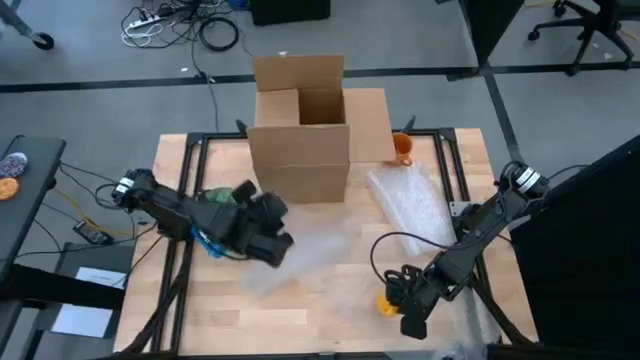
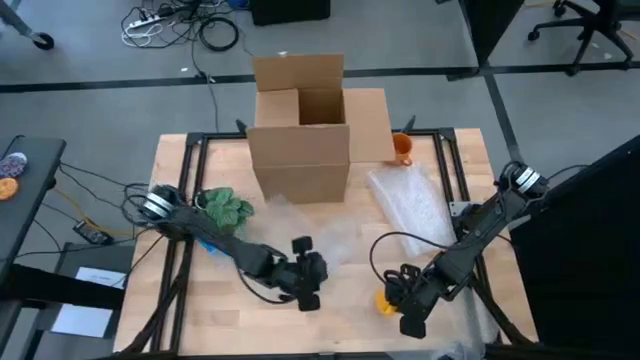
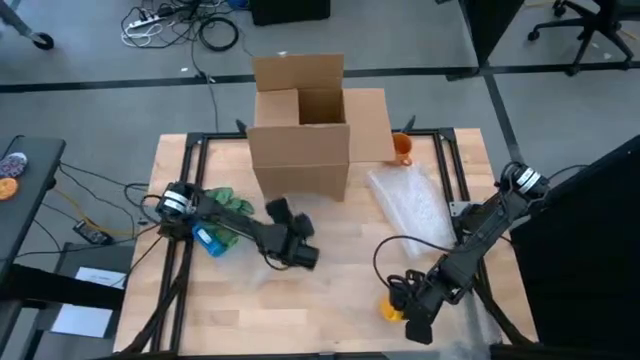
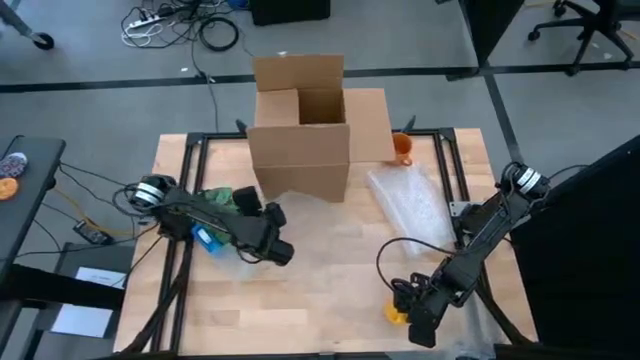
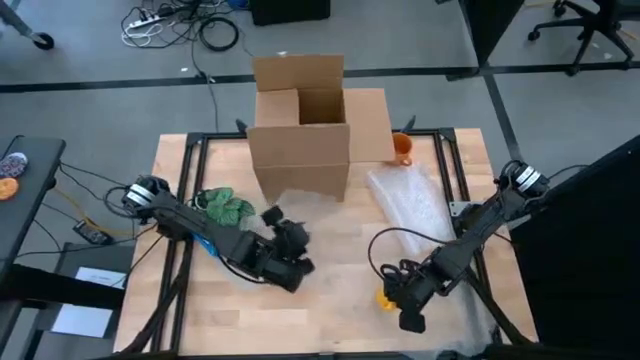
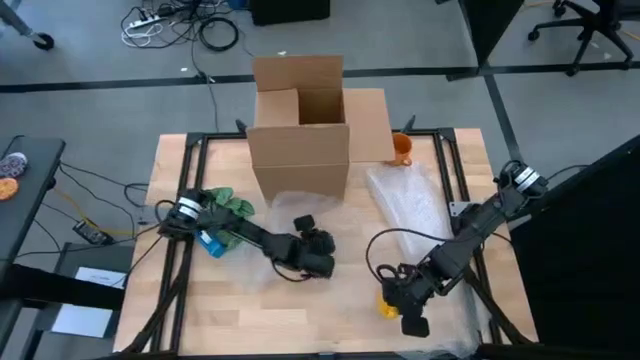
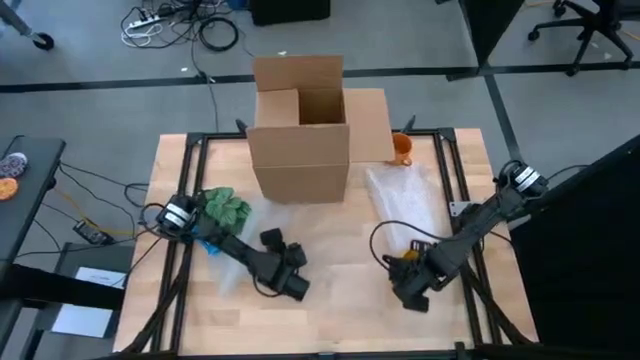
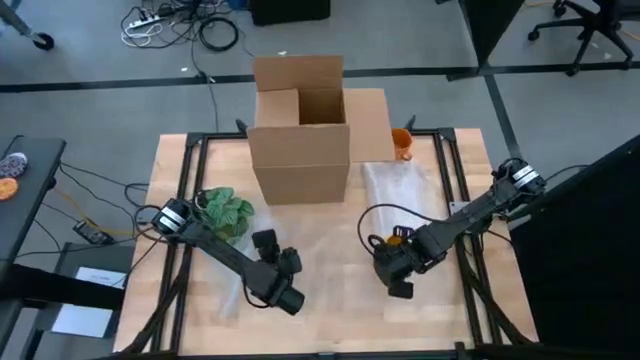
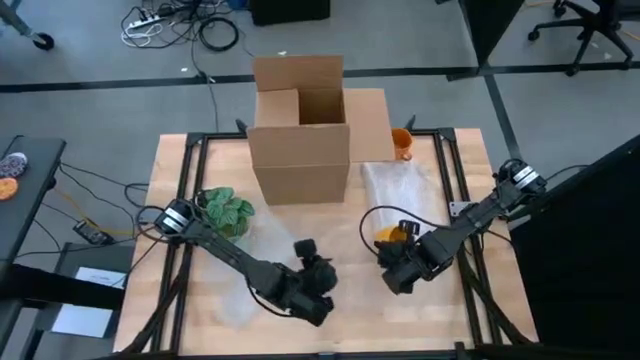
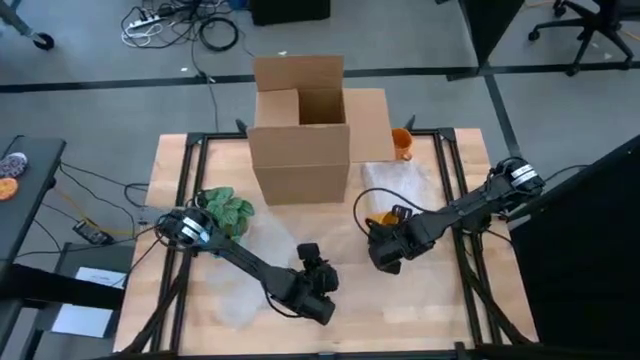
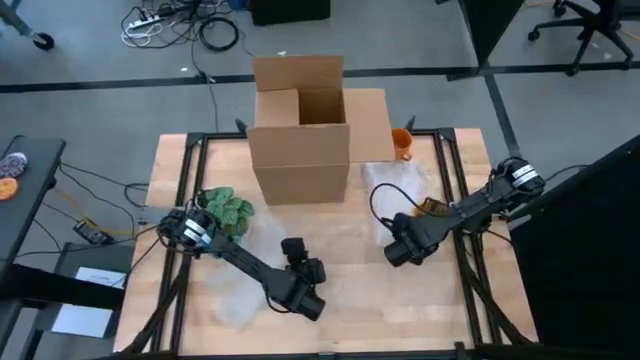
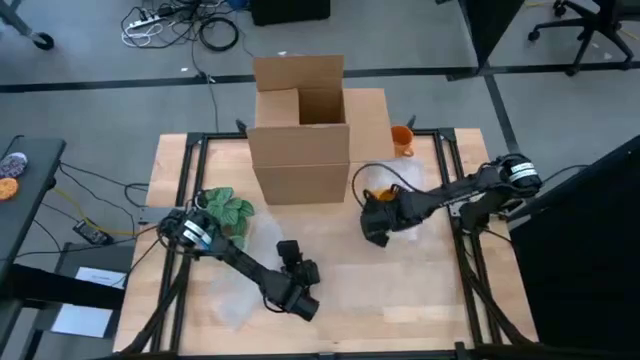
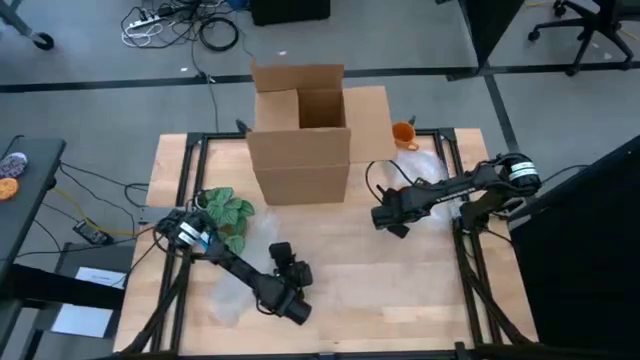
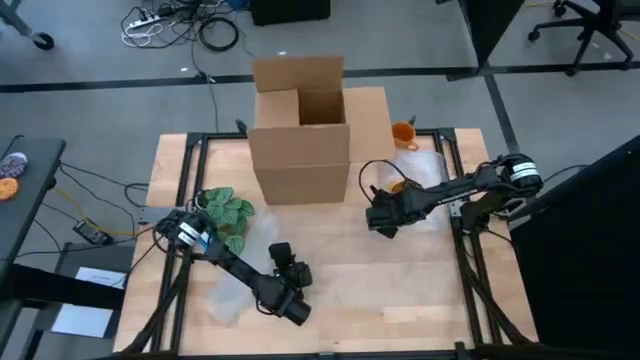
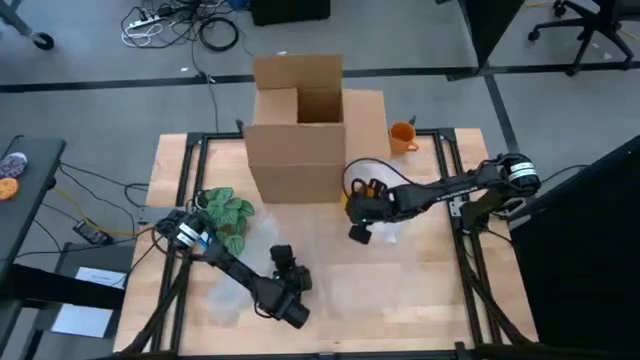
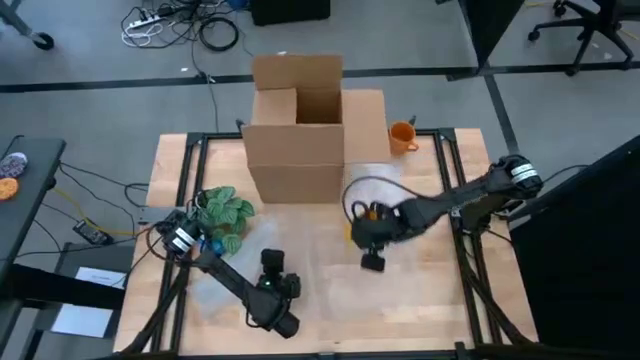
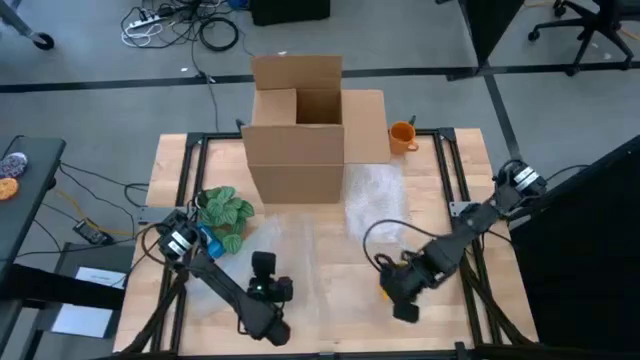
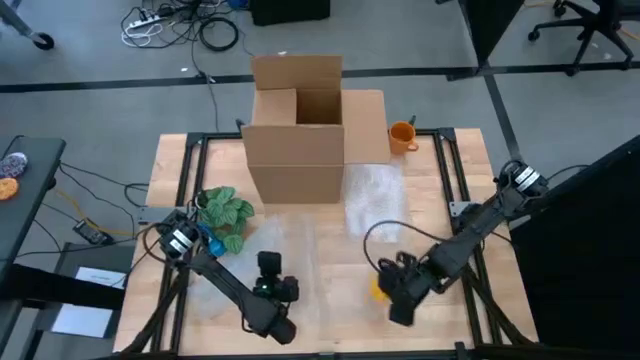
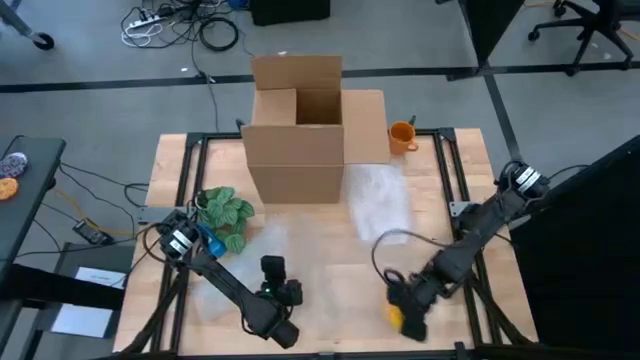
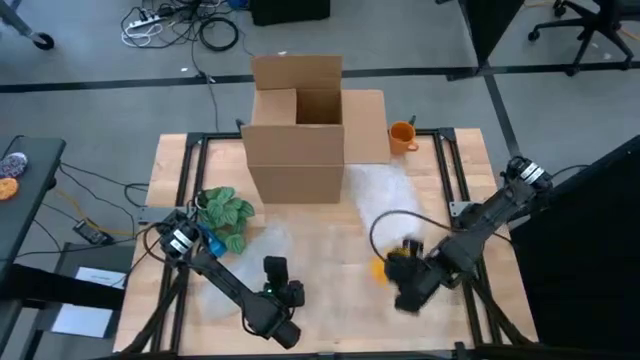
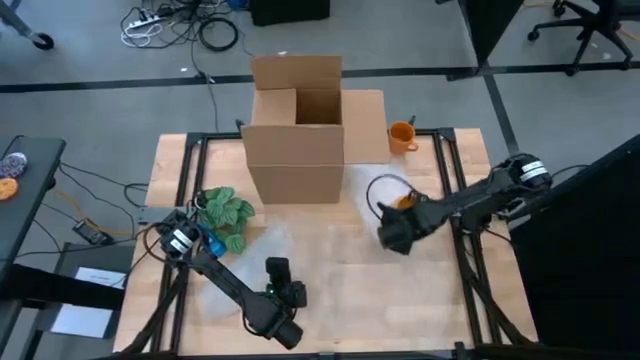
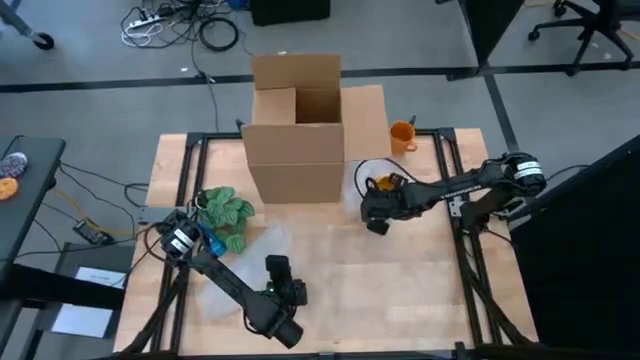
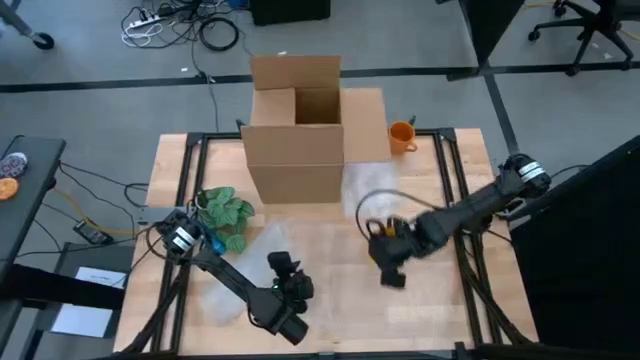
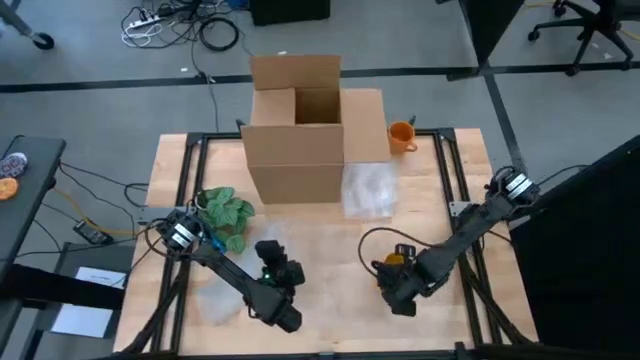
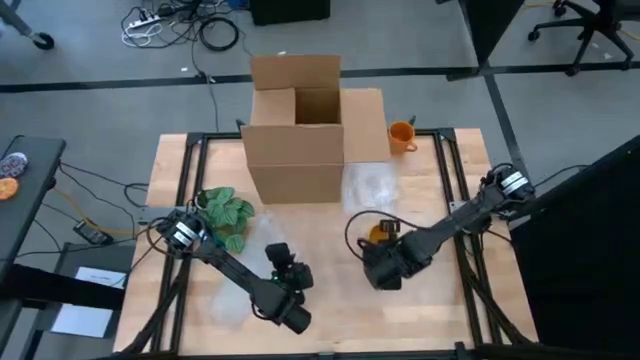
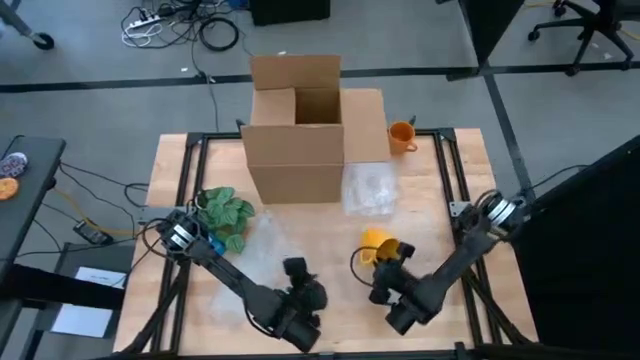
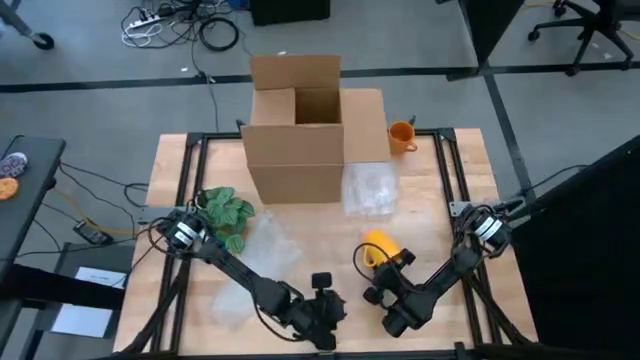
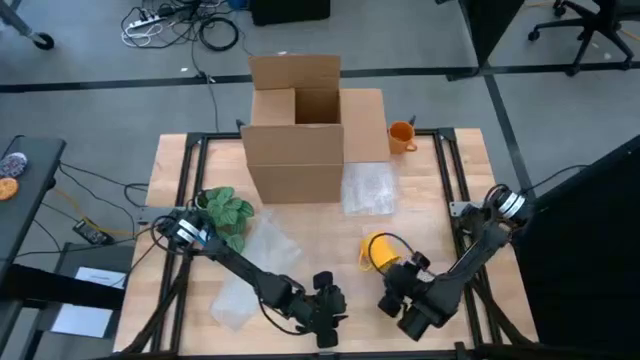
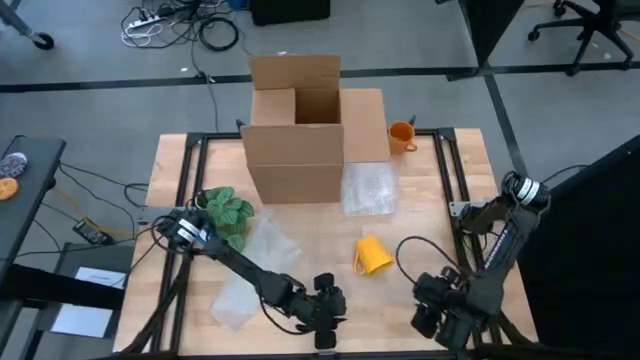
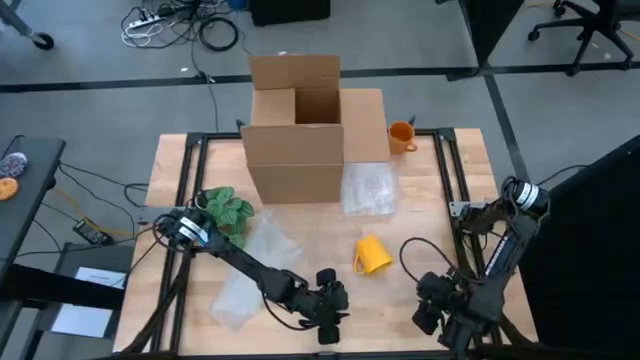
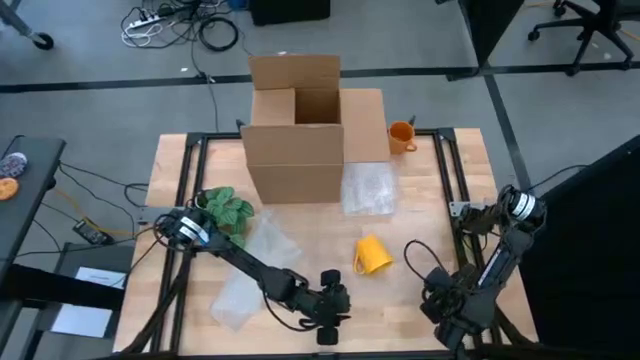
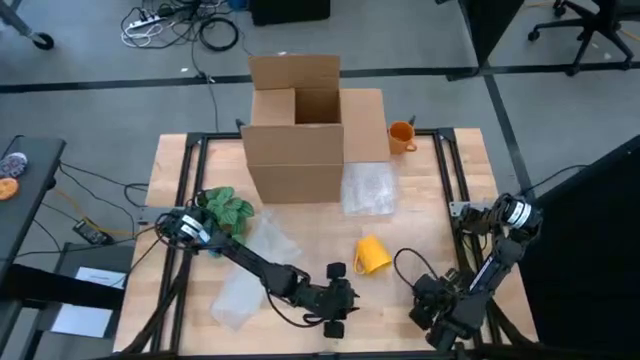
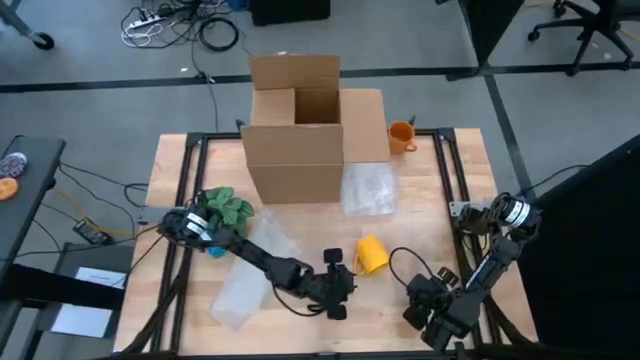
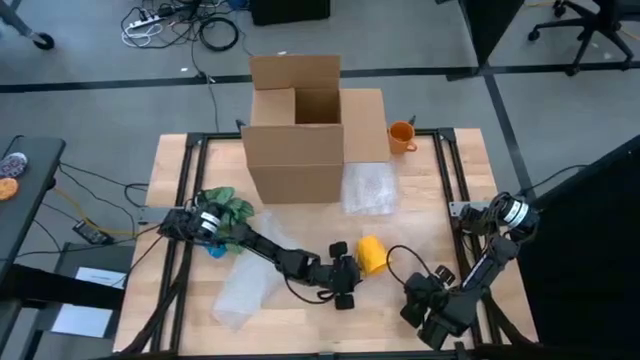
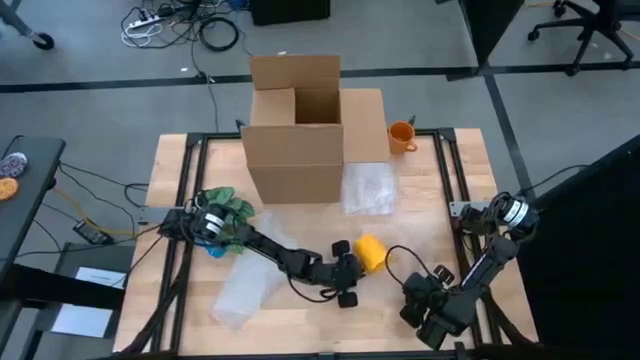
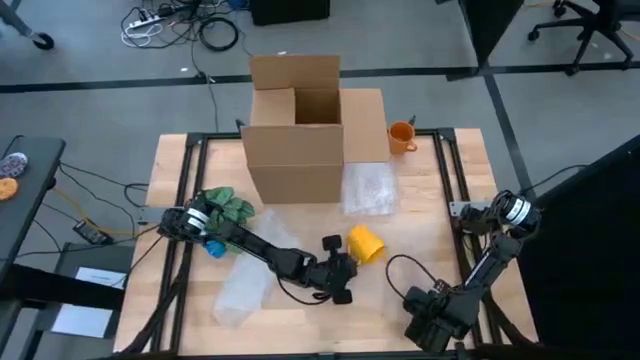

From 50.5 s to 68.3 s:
Task: wrap mug
Wrap the yellow mug with the bubble wrap

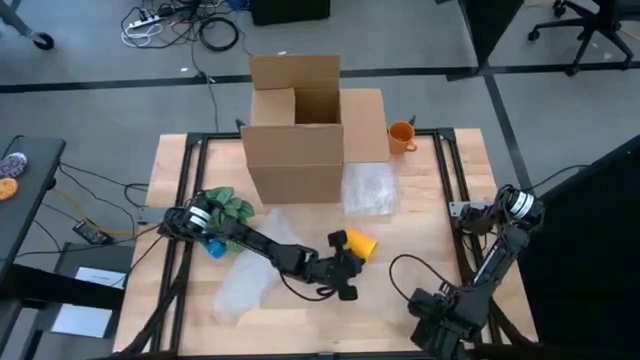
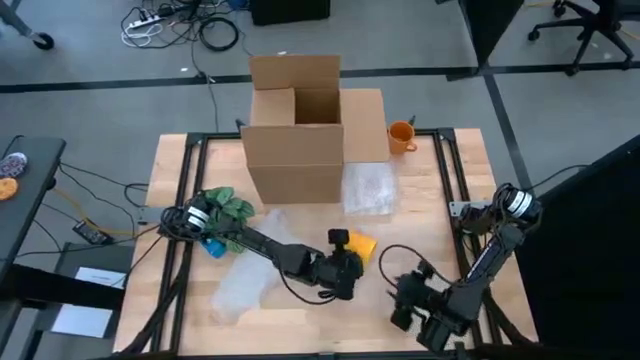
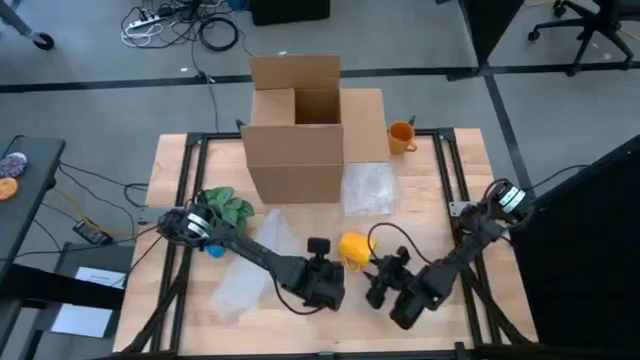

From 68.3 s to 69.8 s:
Wrap the yellow mug with the bubble wrap

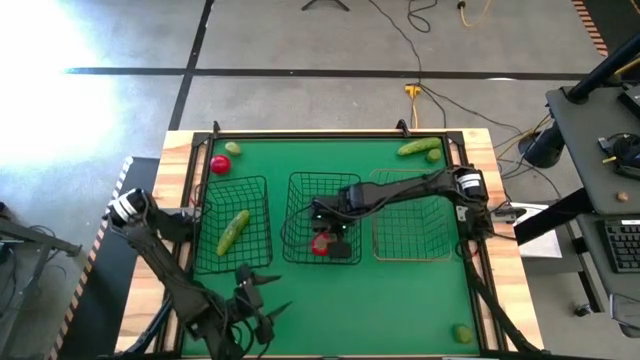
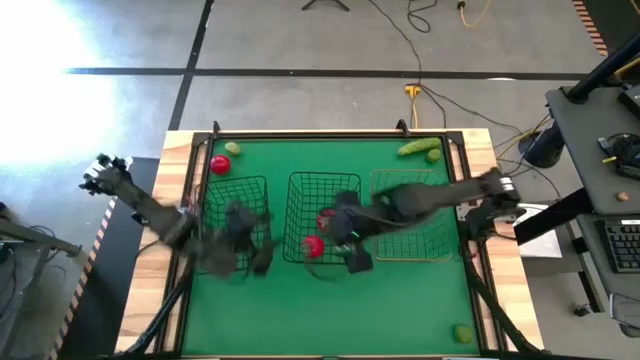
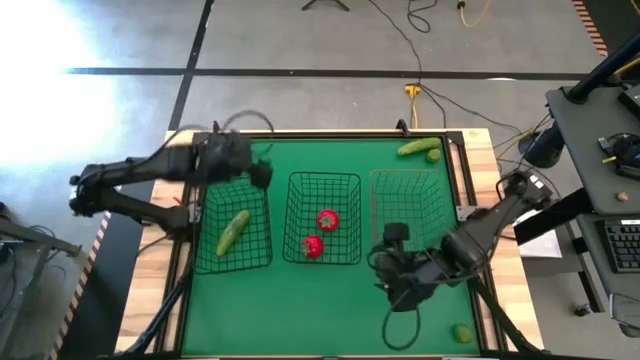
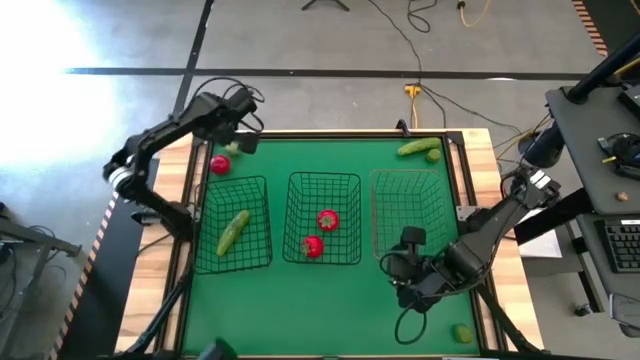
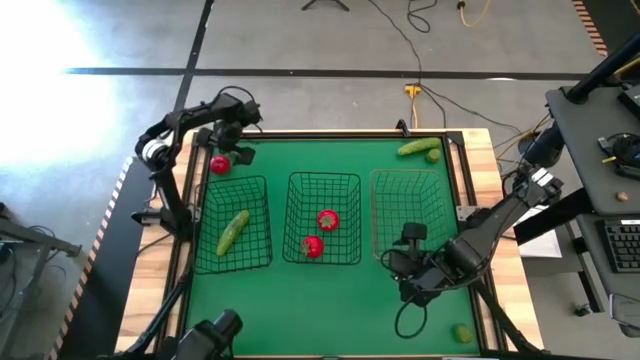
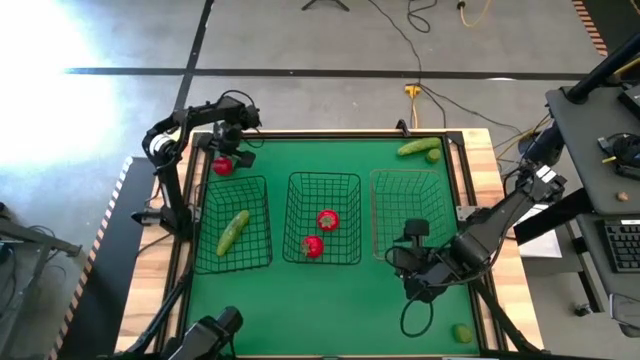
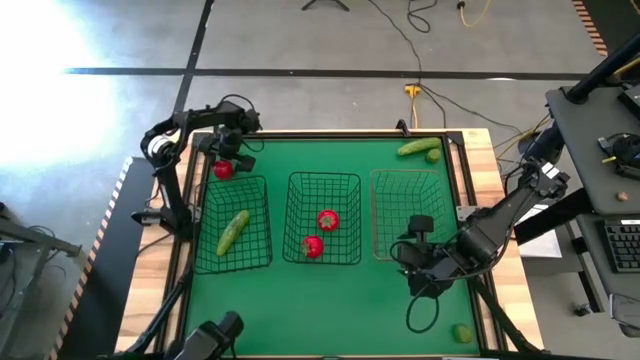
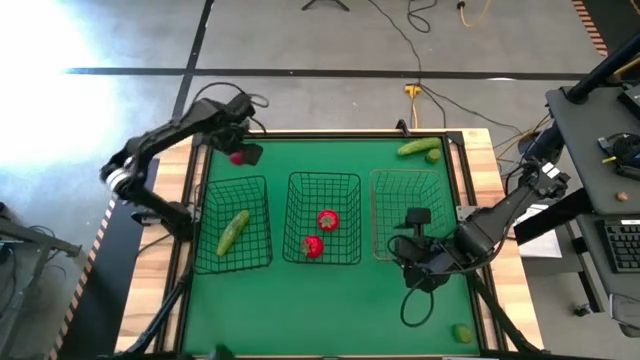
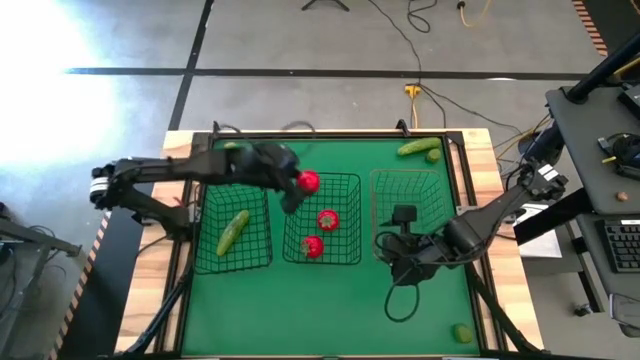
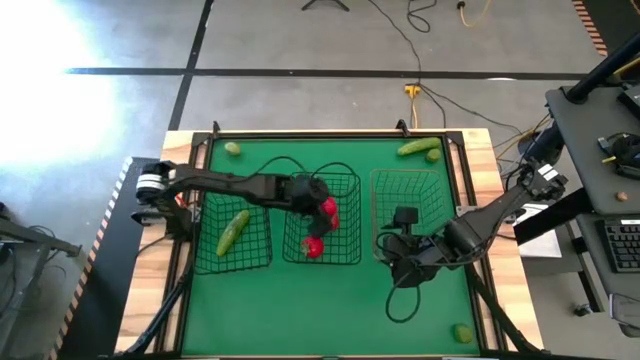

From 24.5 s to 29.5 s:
Task: Sort produce into baskets
Put the tomato into the right black wire basket
